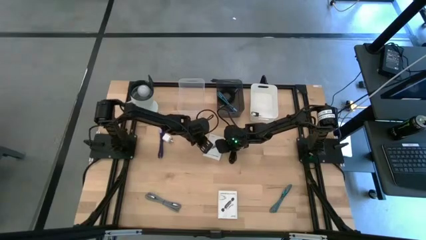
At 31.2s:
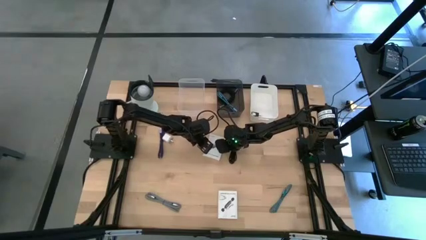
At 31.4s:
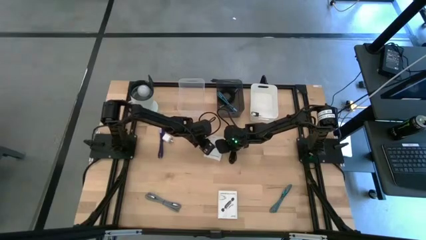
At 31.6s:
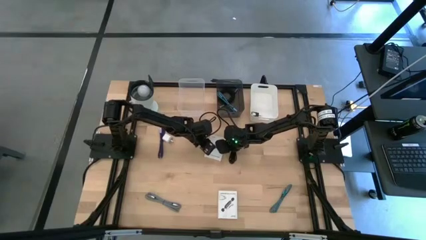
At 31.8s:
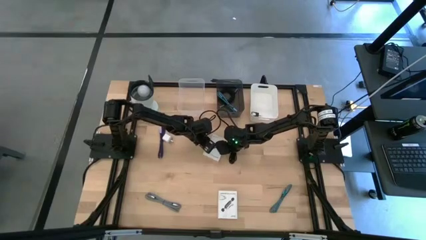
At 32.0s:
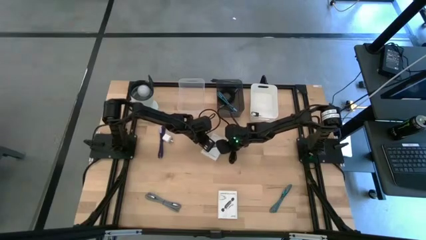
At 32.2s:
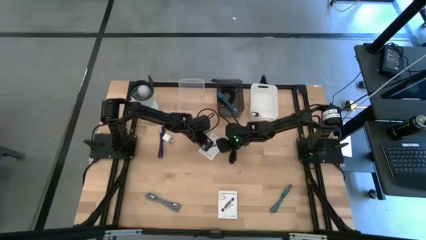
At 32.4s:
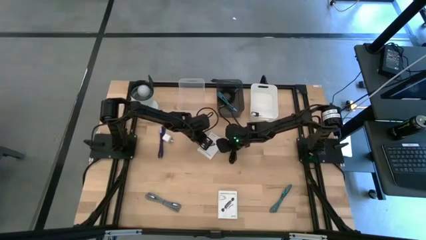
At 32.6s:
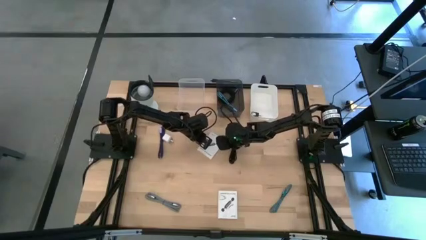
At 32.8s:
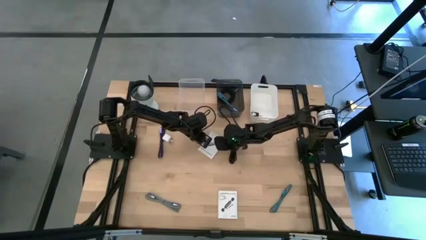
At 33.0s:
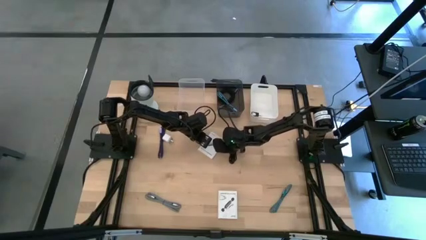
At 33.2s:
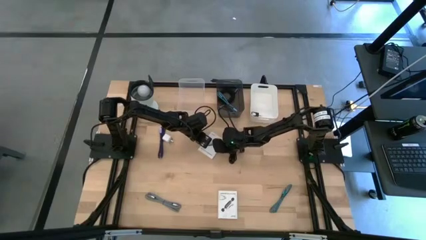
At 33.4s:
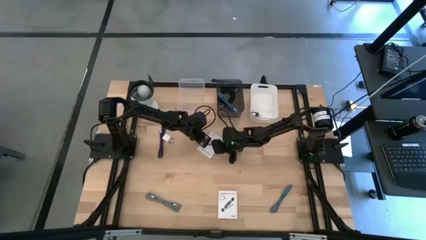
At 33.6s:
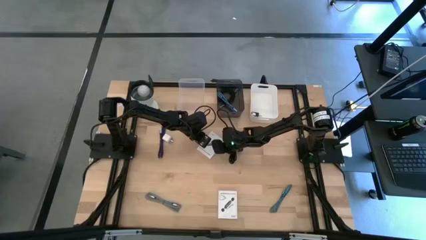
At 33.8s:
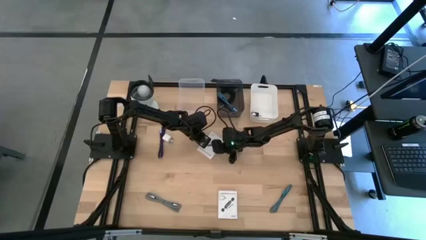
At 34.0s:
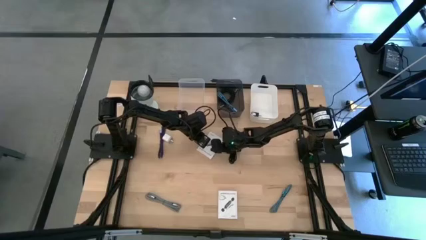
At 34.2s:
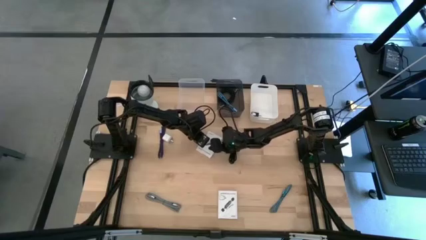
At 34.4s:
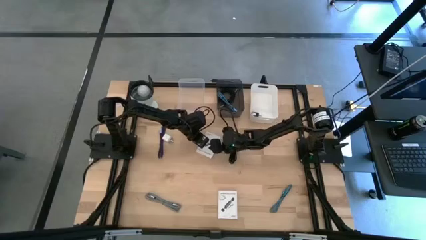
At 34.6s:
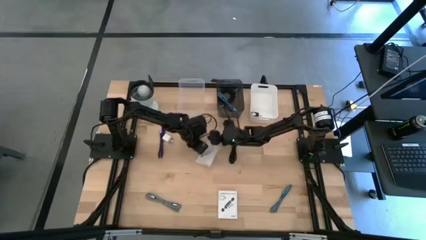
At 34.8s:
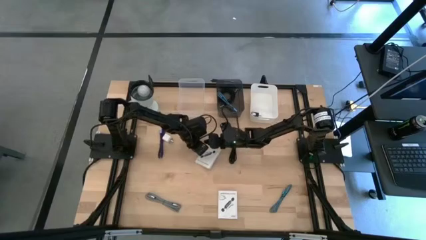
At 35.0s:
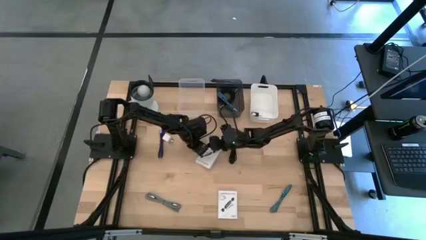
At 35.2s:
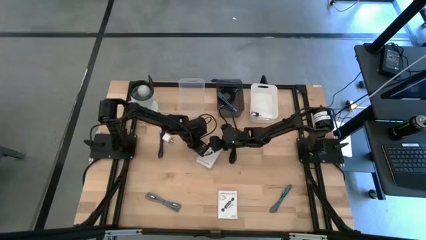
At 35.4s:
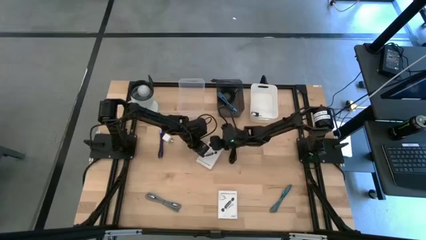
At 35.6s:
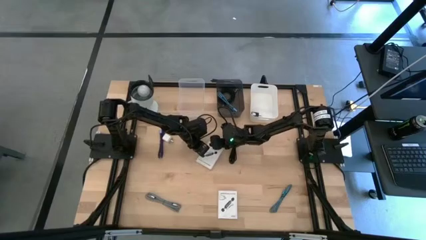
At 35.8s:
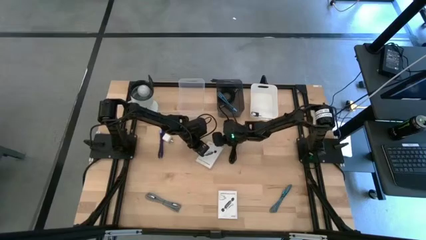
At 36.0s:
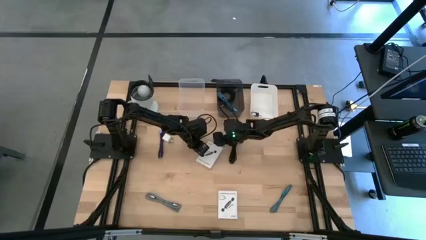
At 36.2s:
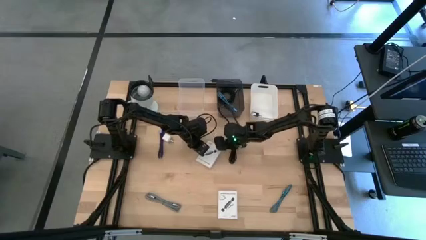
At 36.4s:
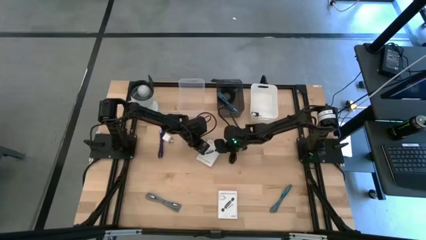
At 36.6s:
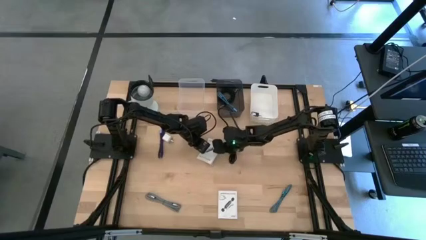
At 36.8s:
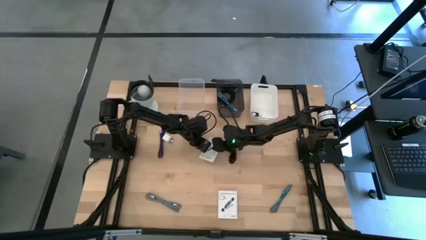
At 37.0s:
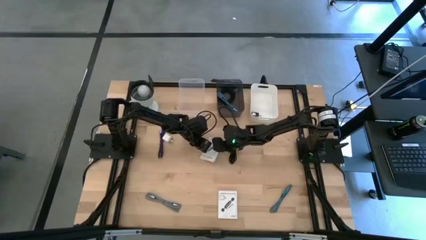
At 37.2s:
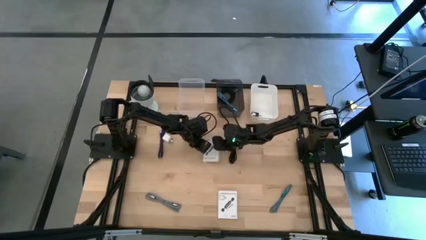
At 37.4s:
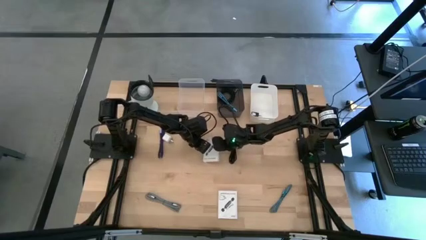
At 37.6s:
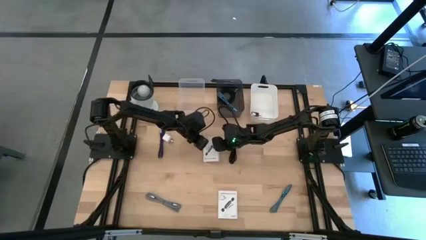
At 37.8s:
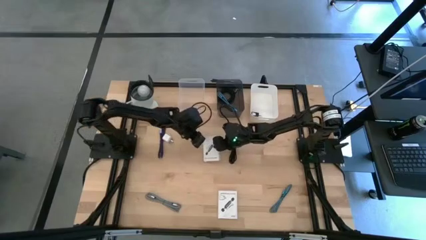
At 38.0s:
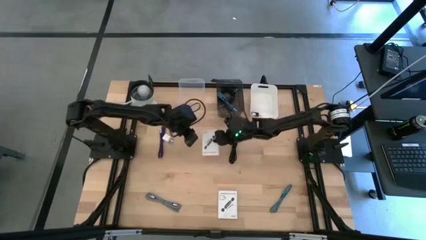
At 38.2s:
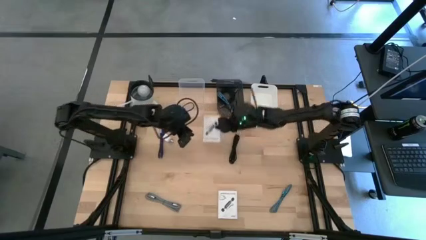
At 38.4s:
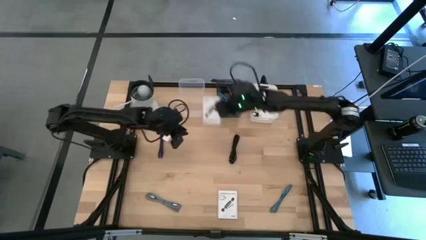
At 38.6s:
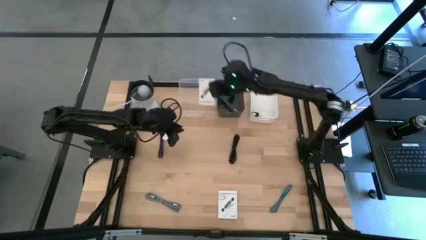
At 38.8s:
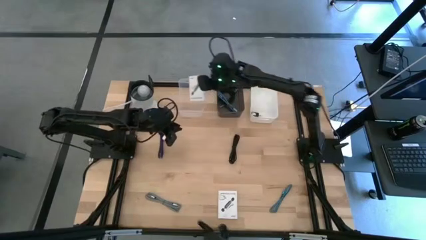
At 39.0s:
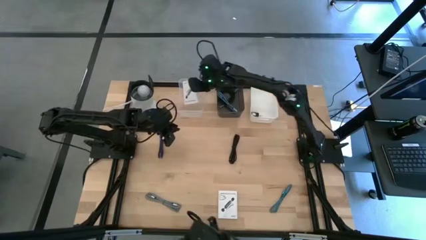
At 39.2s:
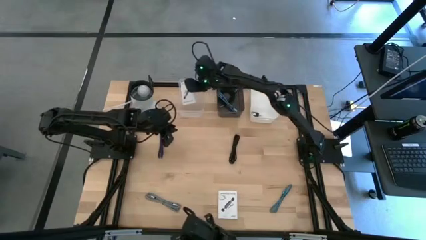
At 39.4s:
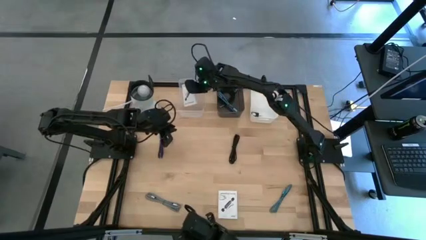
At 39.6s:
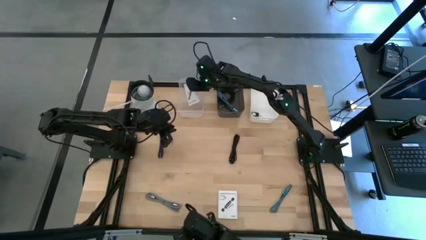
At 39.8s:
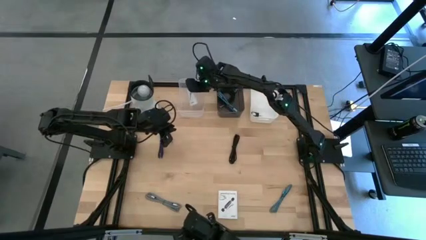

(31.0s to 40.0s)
Task: Pick and place items into bin
Put the top white card reader box into the transparent bin

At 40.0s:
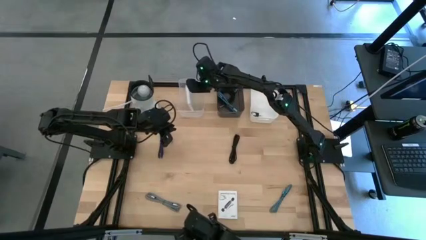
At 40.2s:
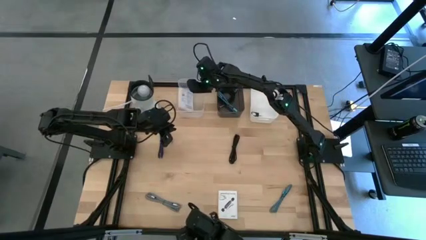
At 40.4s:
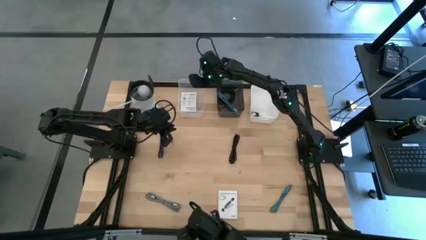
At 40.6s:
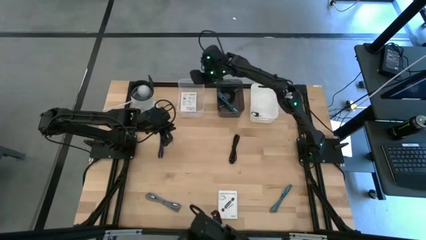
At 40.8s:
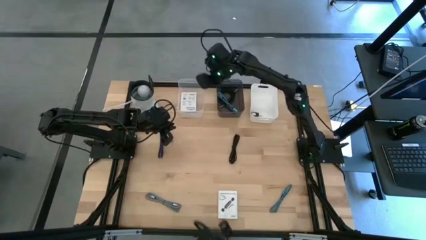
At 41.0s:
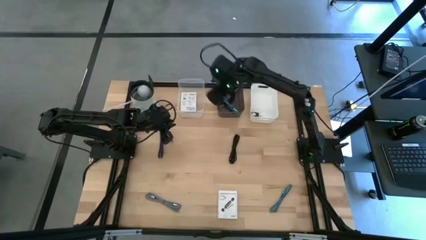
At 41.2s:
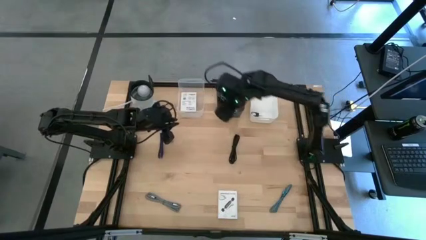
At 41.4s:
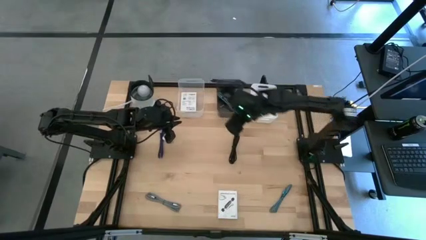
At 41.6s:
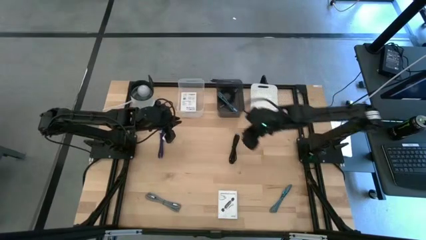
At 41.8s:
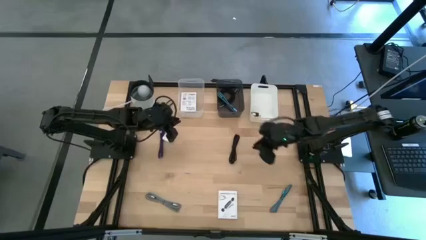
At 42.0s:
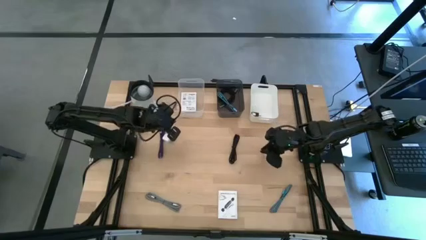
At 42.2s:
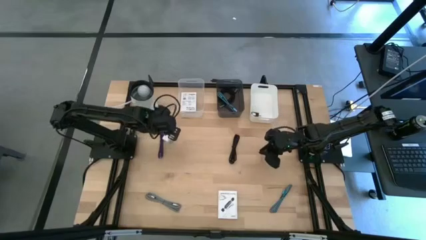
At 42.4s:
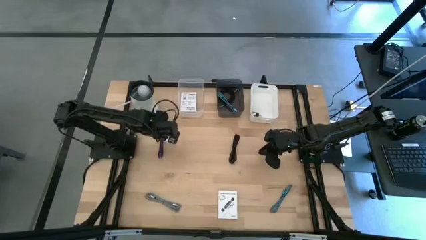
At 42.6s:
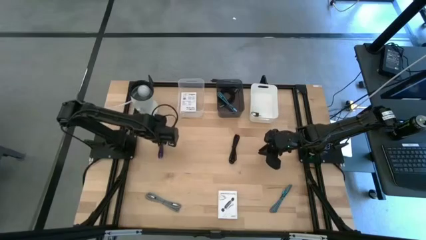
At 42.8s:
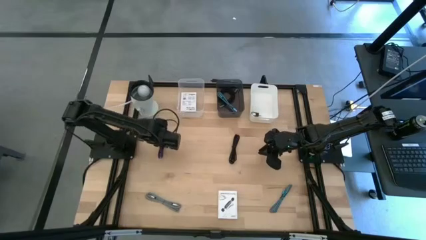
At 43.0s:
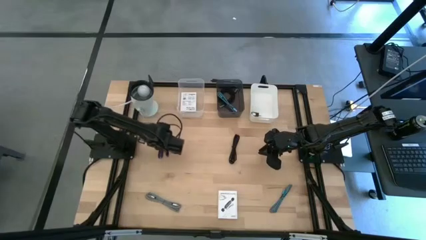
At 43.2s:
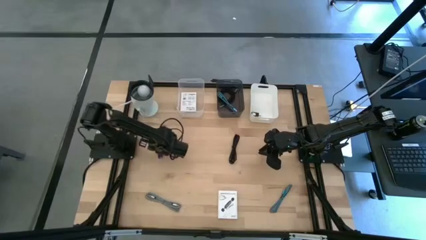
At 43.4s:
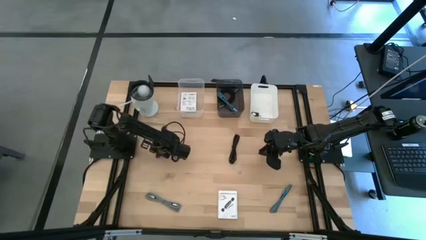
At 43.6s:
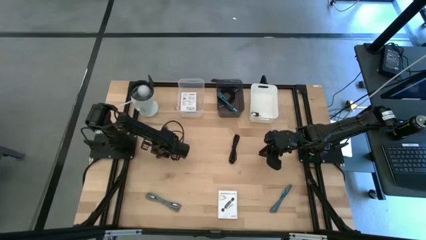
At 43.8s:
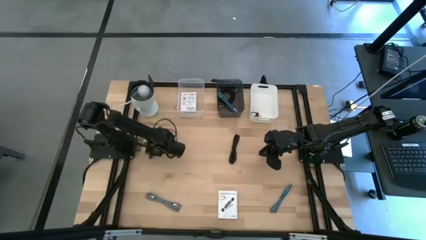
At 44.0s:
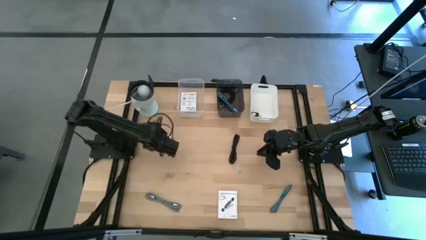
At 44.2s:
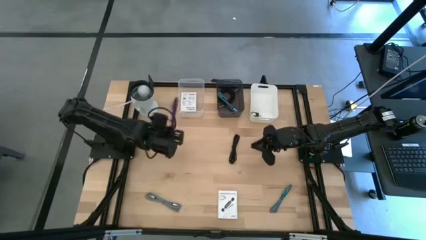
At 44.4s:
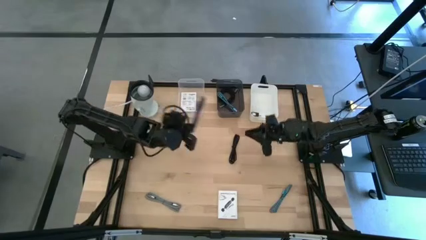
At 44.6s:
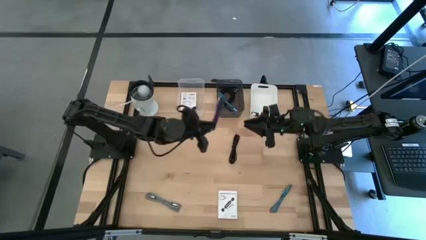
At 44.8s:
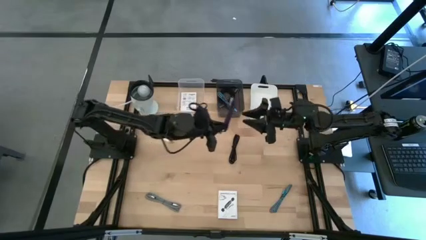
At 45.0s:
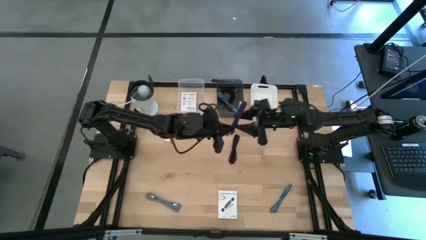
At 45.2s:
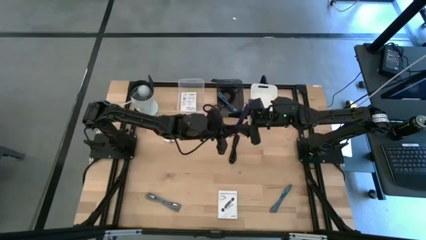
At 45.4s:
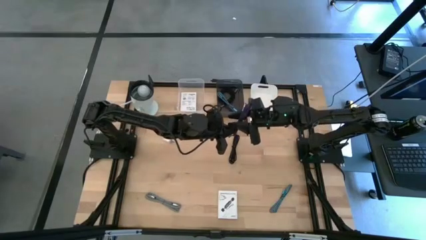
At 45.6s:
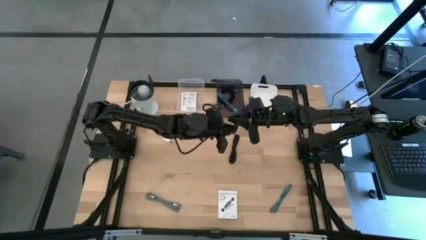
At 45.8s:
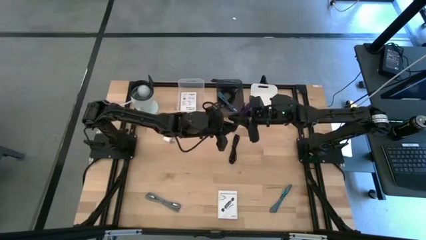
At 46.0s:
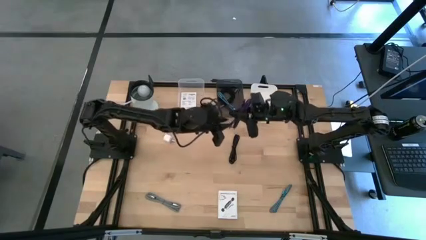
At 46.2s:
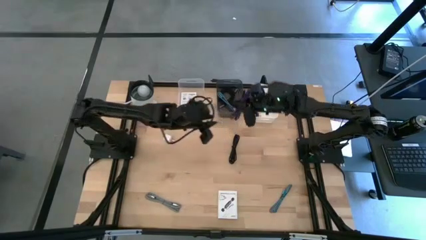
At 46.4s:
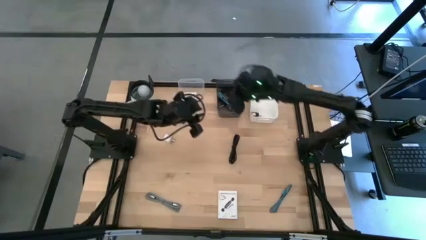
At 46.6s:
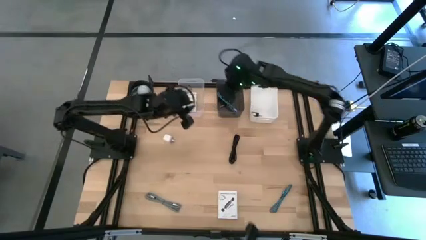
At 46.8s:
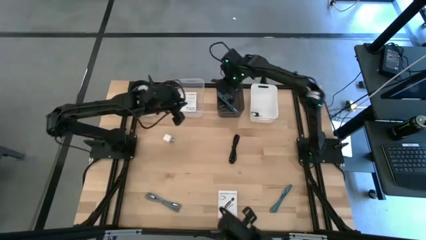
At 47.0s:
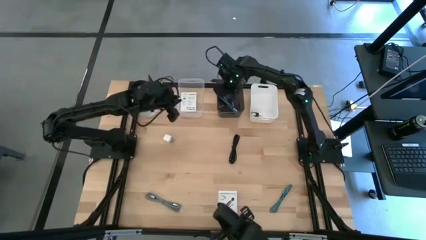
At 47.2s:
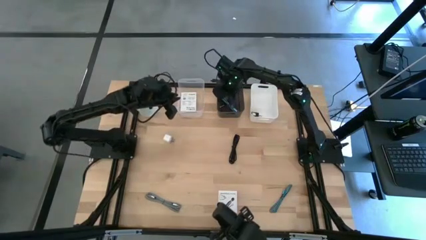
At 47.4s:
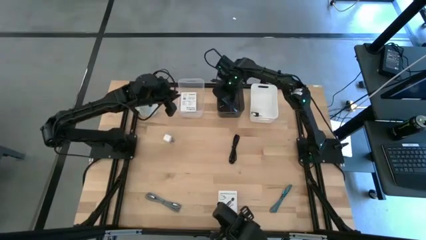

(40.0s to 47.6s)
Put the purple charger cable into the black bin

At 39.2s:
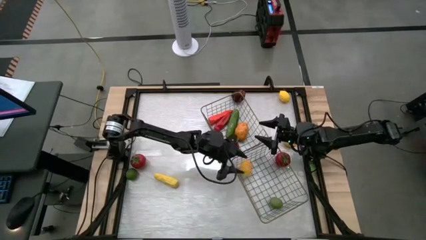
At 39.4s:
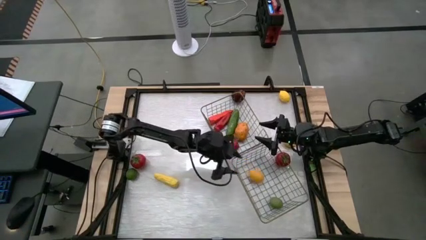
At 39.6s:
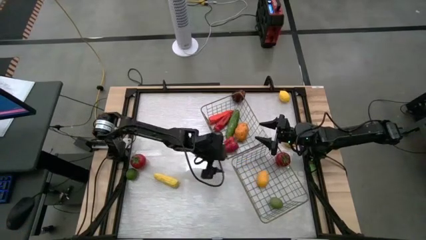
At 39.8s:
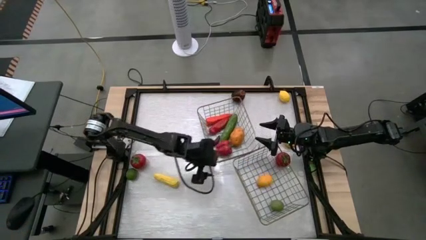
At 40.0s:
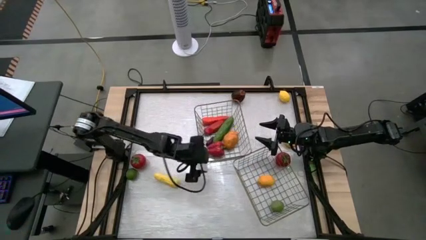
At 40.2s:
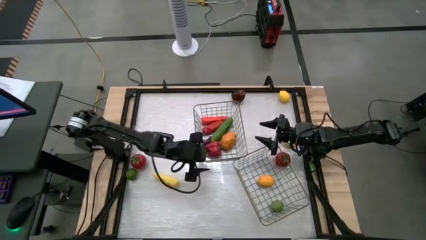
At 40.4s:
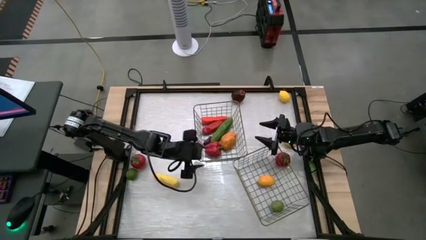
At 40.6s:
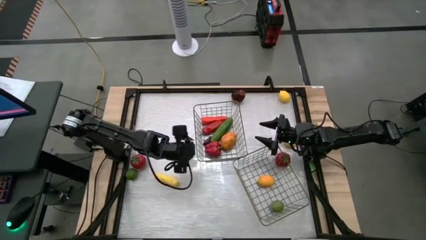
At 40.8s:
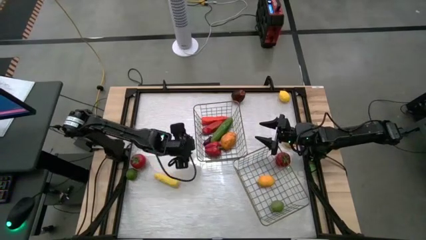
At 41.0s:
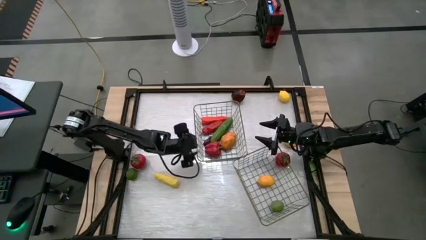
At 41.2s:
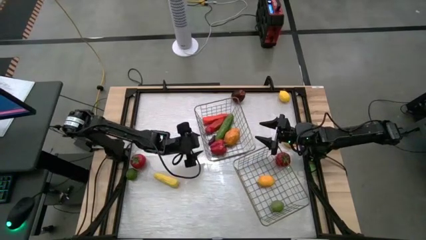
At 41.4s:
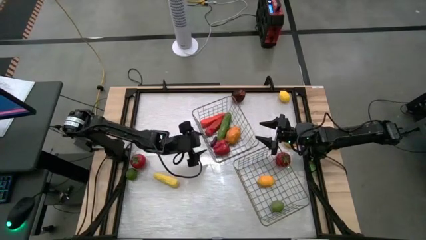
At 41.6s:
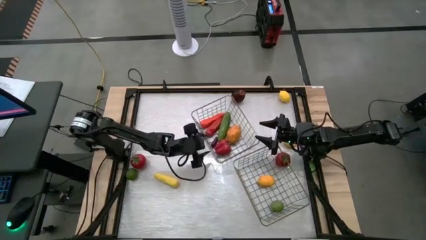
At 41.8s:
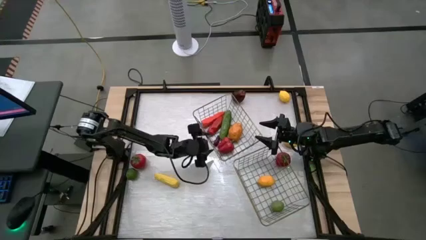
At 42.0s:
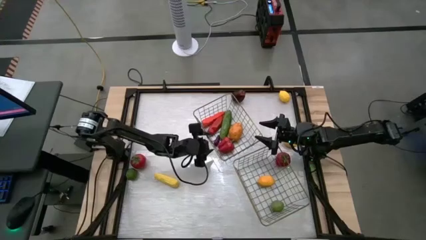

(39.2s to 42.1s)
Task: Sort produce into baskets
Adjust the wire basket
